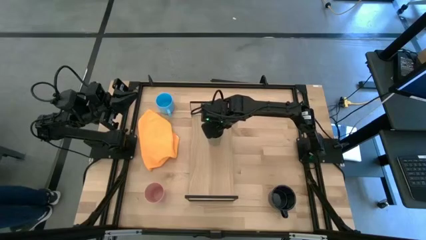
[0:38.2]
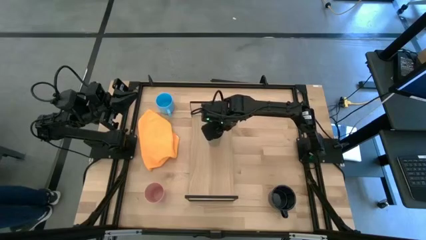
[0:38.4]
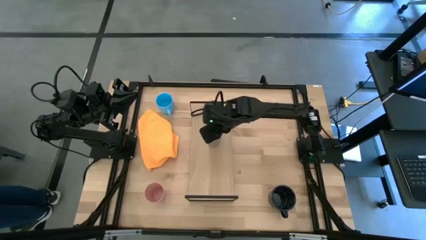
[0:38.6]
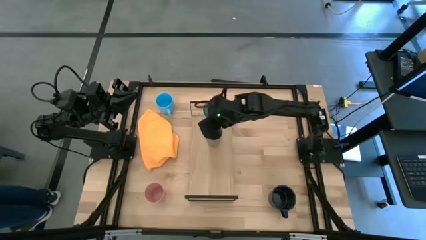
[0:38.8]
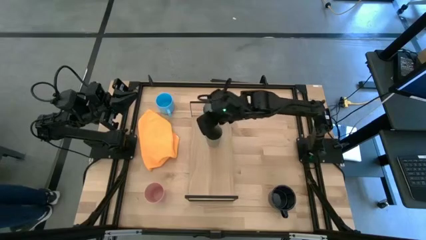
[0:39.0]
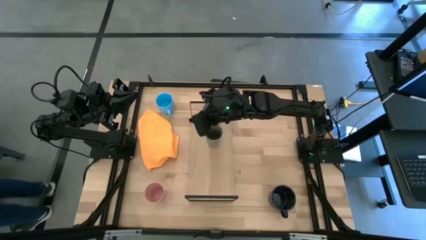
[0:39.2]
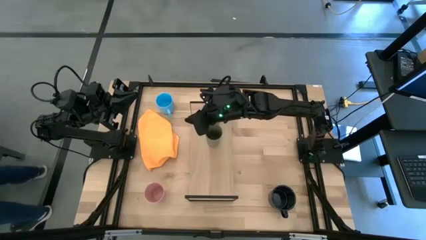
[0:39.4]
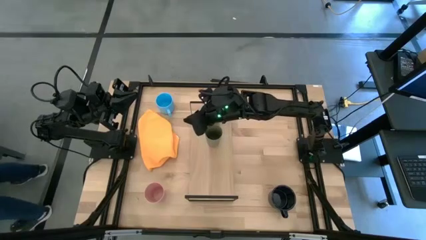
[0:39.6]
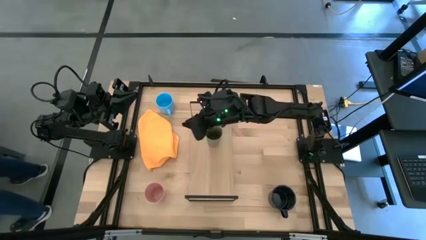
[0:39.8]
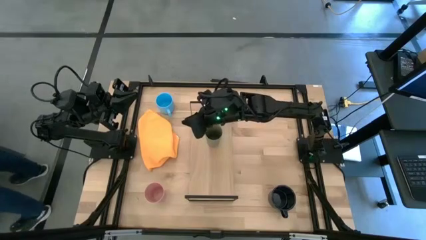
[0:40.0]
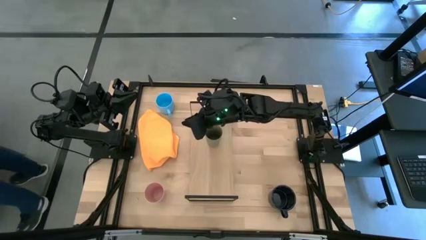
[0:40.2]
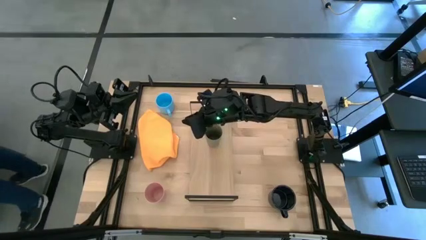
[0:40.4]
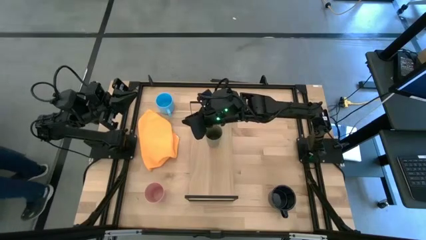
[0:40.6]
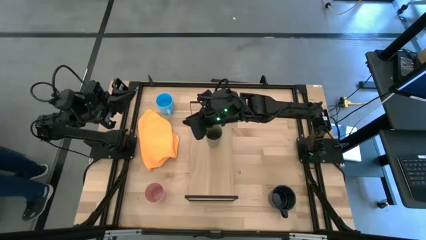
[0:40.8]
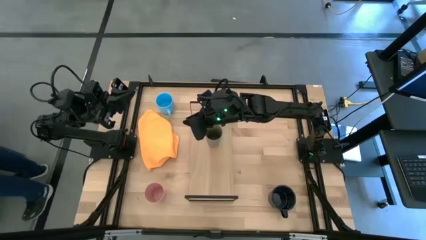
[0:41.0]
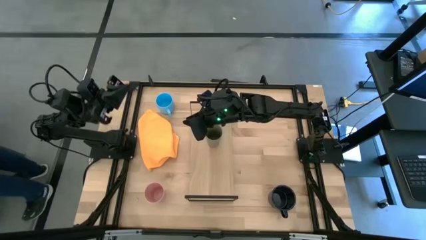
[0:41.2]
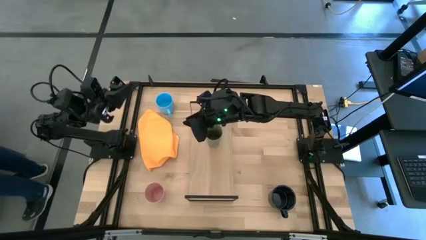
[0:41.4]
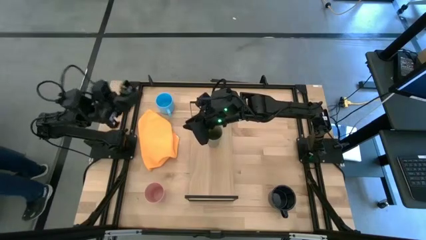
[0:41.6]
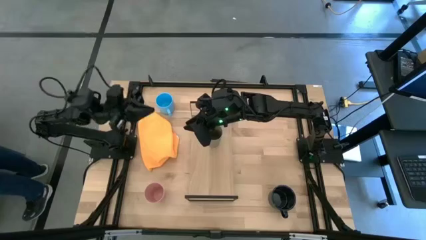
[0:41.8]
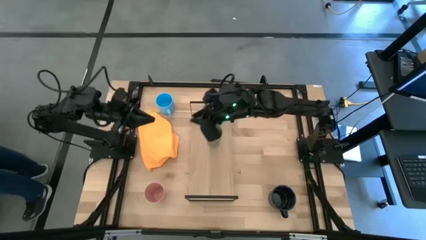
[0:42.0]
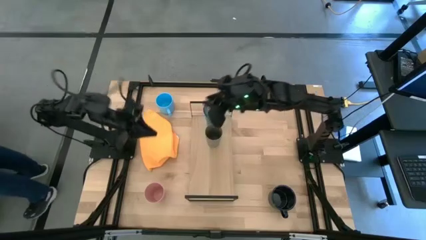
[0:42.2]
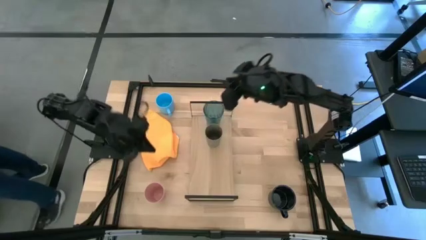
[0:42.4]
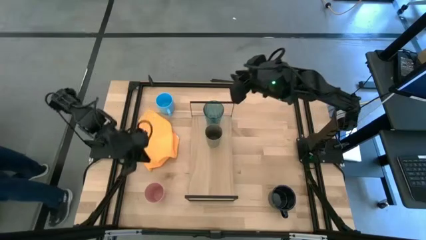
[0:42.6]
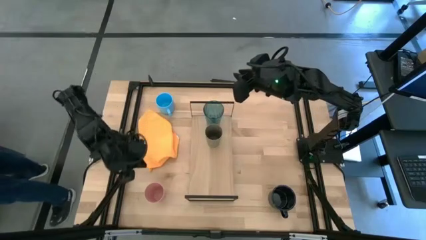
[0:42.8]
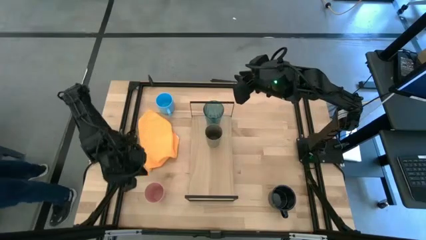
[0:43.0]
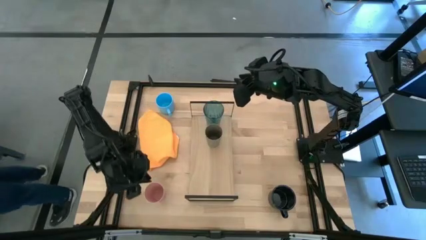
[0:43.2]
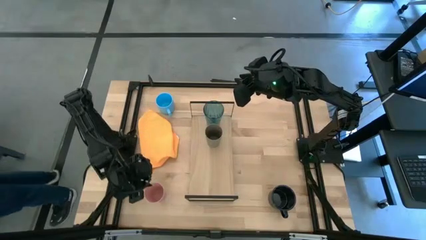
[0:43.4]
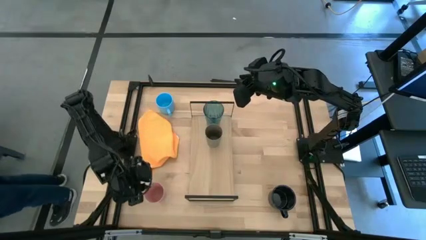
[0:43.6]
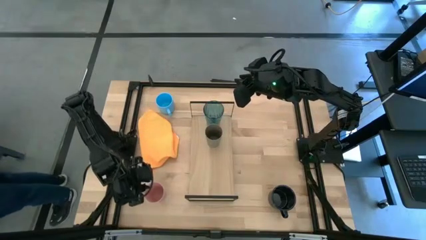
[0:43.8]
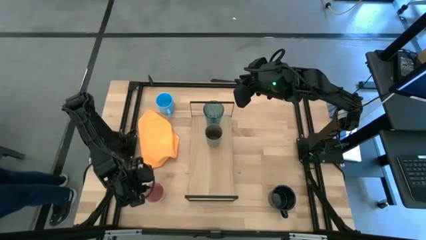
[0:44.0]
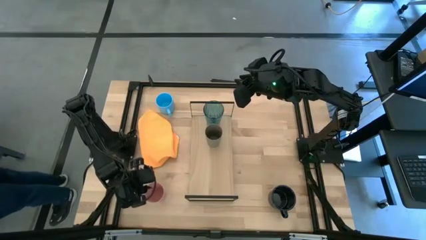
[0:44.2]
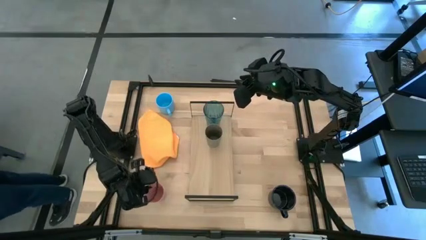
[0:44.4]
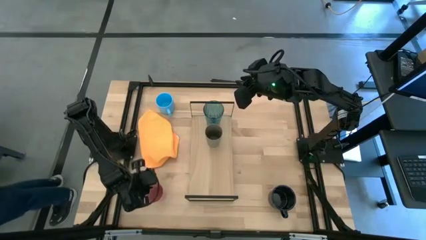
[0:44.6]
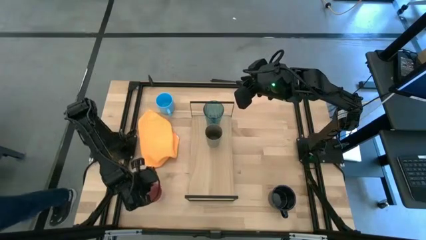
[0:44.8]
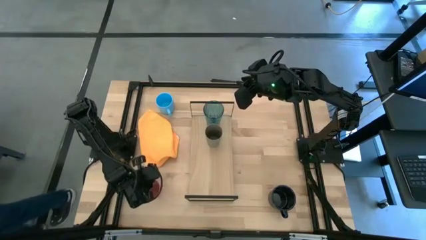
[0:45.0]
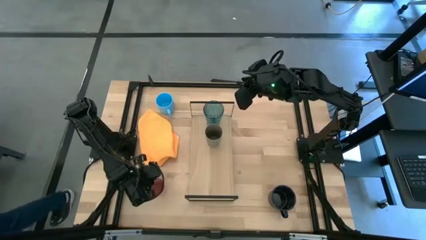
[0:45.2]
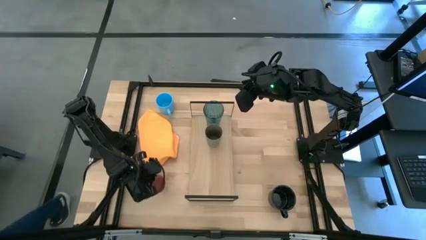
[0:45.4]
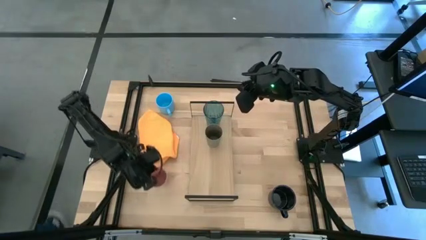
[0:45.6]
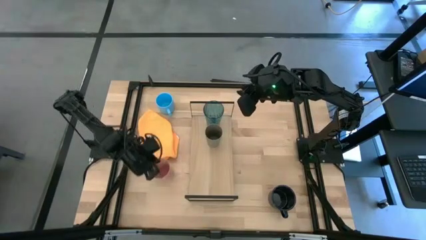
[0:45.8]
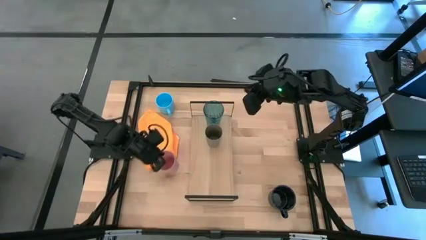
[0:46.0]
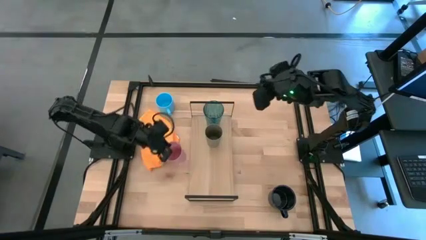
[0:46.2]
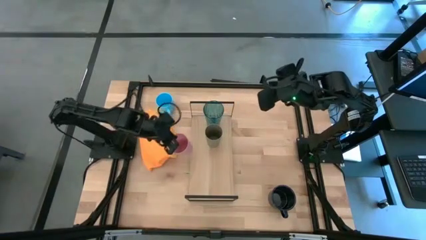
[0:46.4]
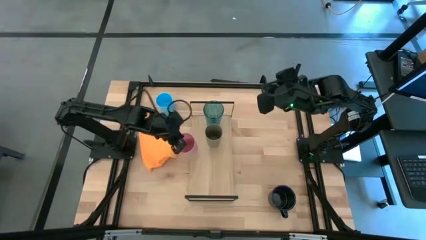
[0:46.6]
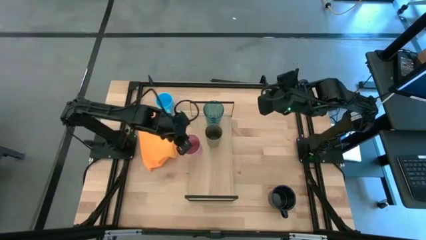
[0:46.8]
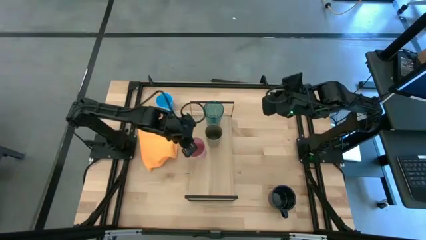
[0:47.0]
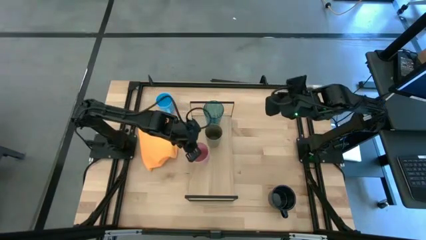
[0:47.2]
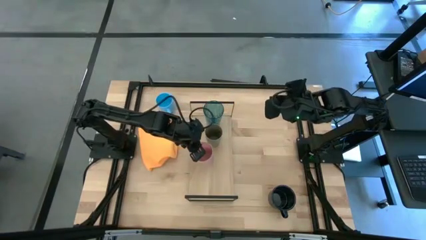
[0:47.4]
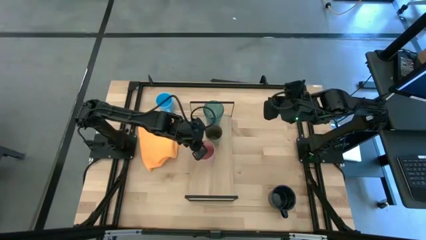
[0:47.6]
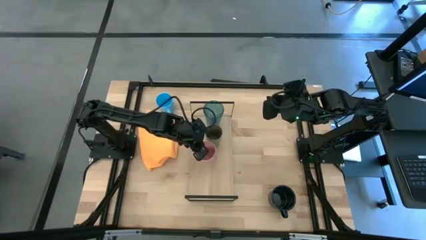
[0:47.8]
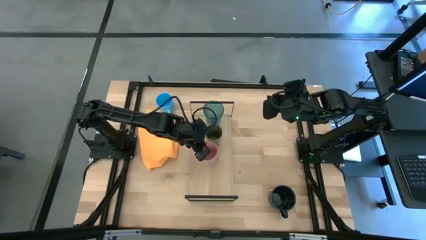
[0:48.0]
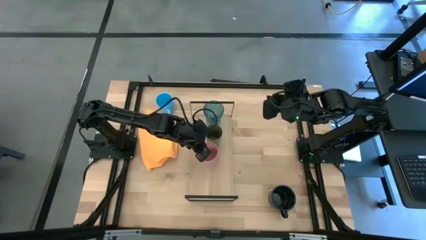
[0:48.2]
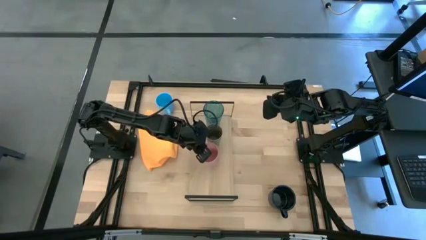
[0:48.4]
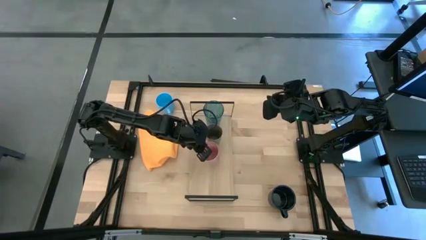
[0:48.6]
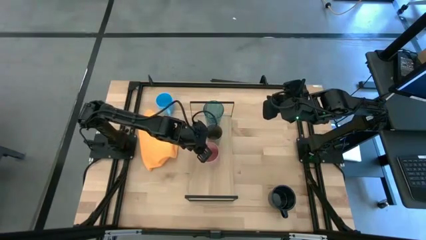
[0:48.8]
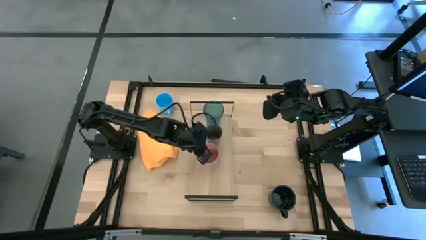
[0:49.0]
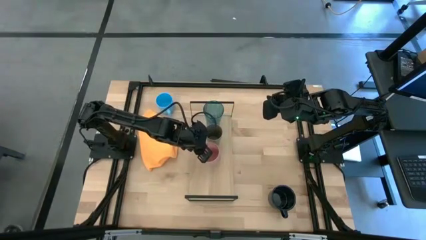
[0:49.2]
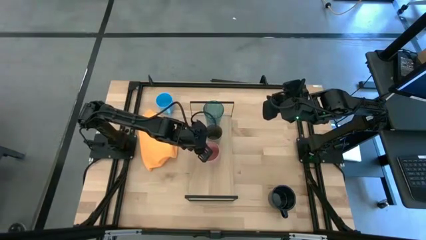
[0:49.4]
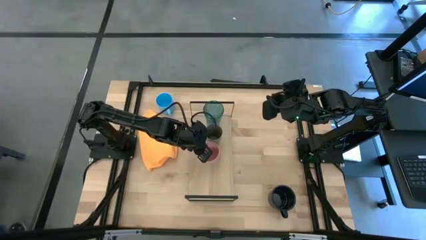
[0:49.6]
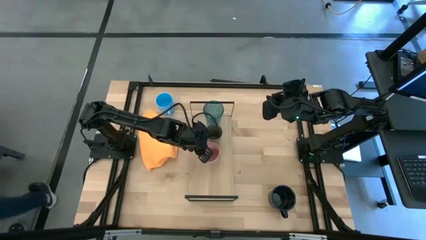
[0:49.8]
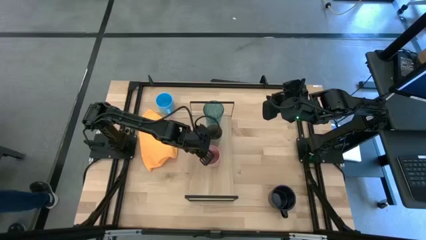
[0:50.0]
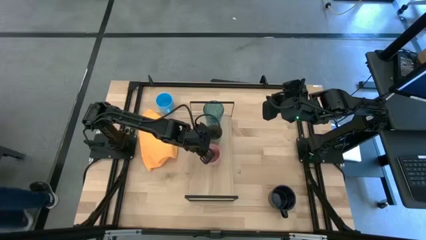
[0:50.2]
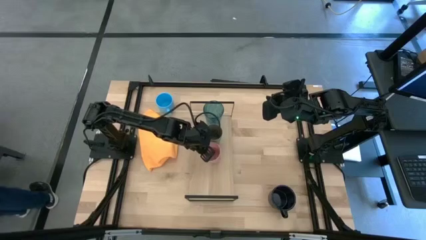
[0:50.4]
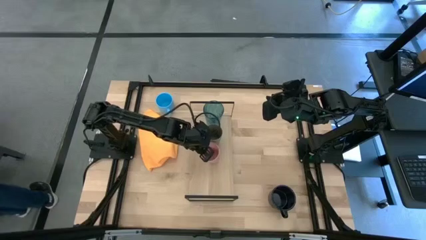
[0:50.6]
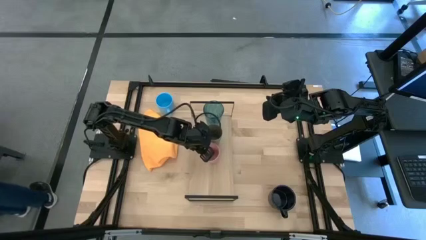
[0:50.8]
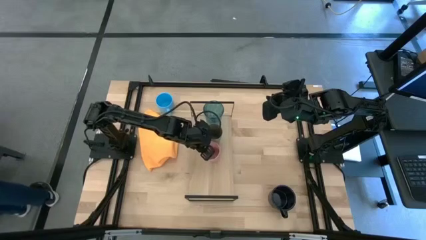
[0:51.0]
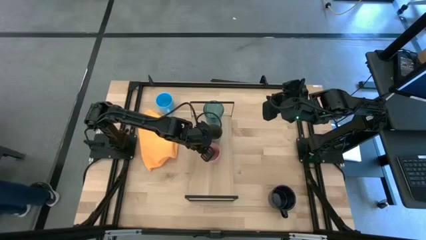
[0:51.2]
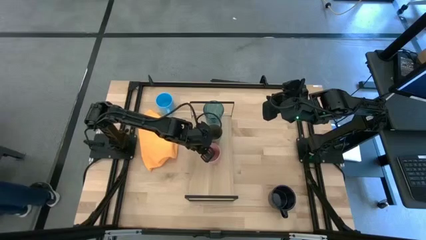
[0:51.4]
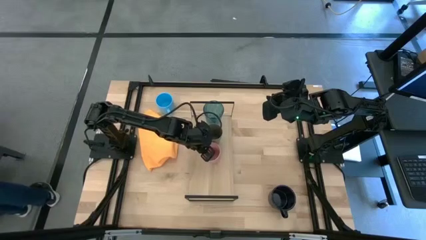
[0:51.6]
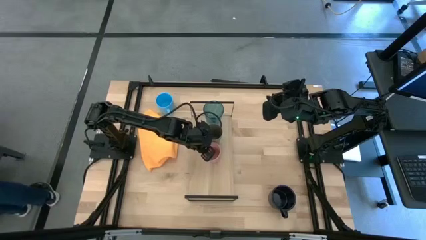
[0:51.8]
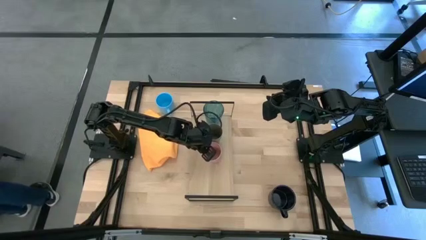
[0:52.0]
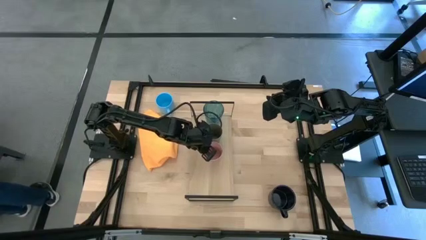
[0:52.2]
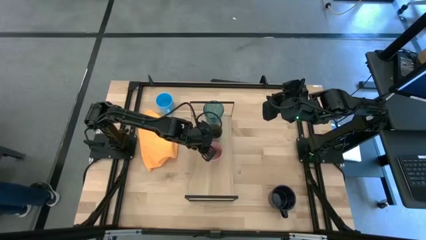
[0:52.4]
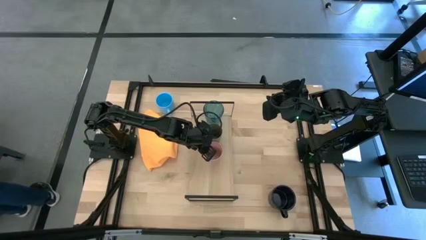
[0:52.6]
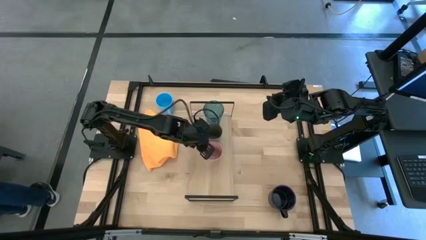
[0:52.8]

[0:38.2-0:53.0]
Task: Stack small to large cups/mugs on shelf
Put the pink cup on the shelf

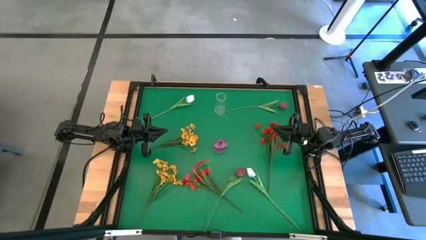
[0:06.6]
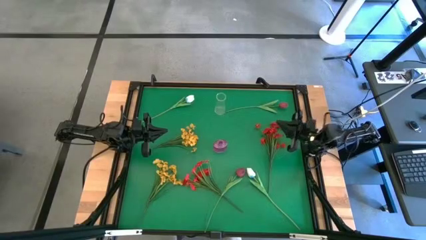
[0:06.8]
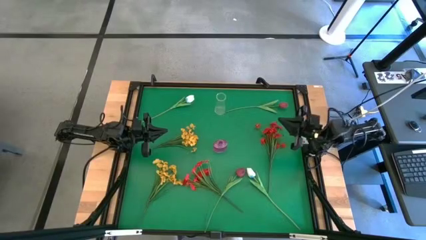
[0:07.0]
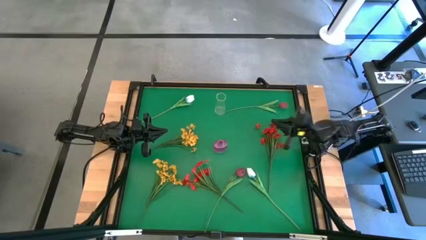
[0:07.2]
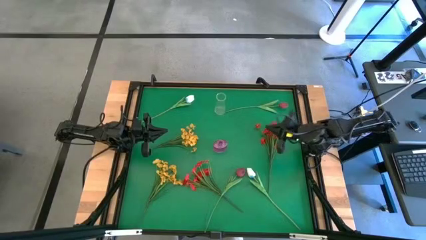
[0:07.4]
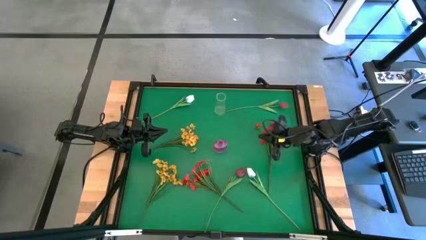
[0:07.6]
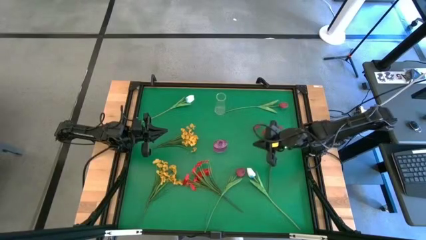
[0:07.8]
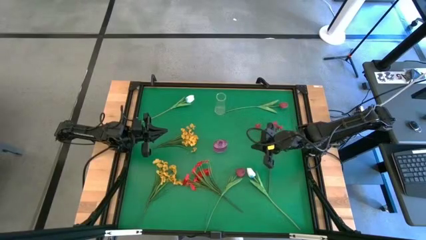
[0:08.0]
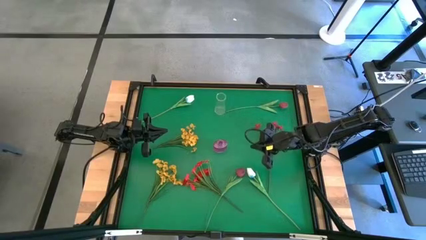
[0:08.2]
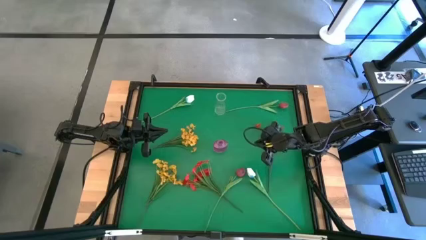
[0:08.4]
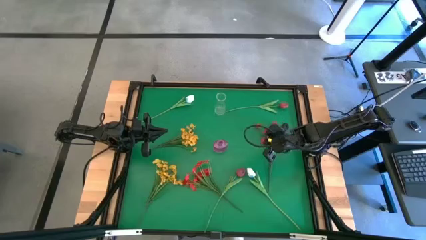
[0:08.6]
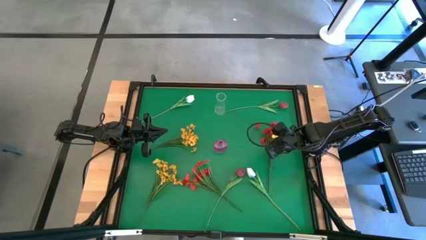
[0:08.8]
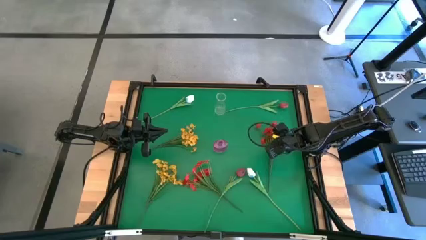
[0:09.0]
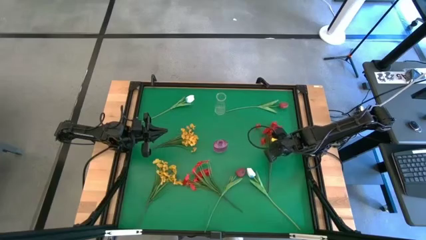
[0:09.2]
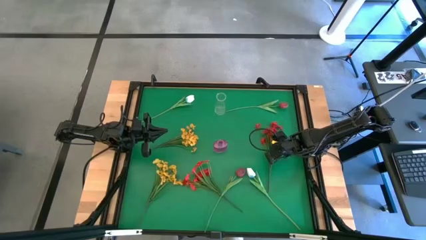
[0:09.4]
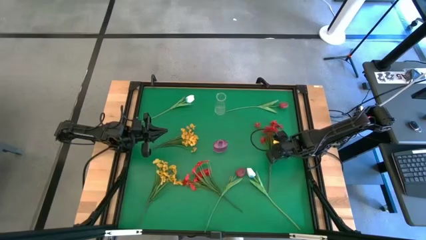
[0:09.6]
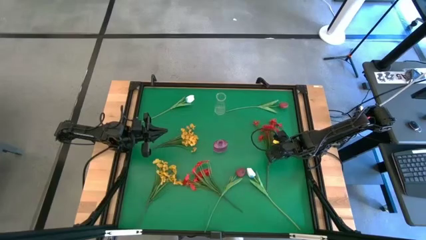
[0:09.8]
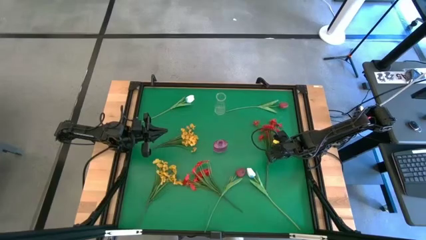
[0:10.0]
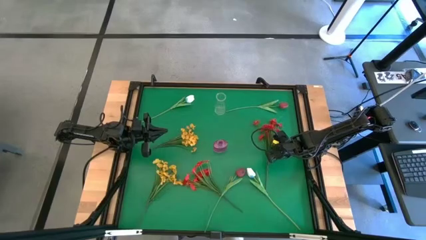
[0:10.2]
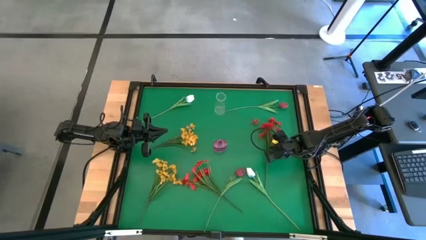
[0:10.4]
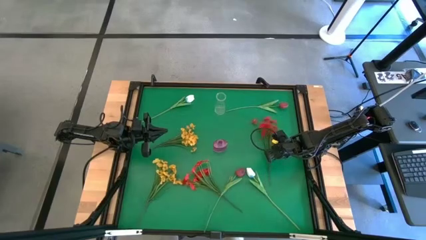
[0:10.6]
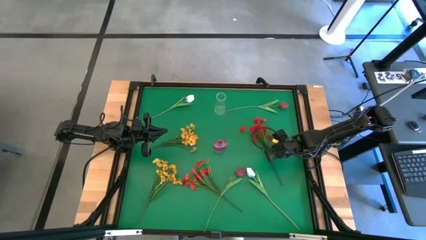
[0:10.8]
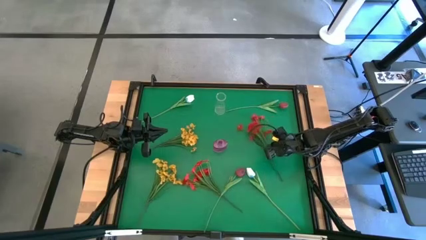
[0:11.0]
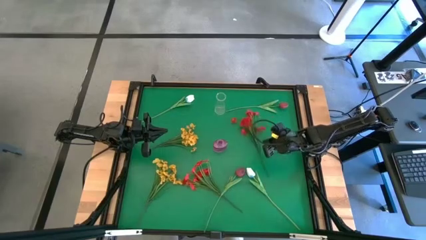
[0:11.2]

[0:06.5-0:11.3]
Task: Sort flowers into vase by color
Put the left red flowers into the pink vase
